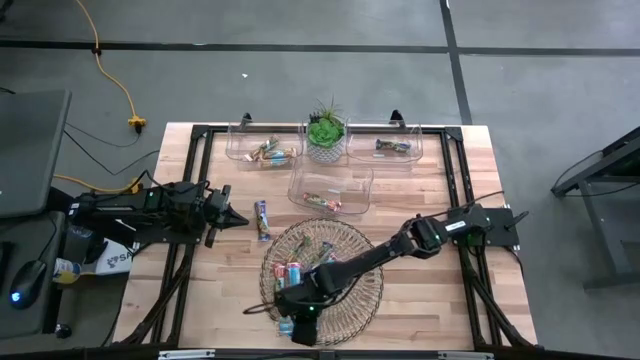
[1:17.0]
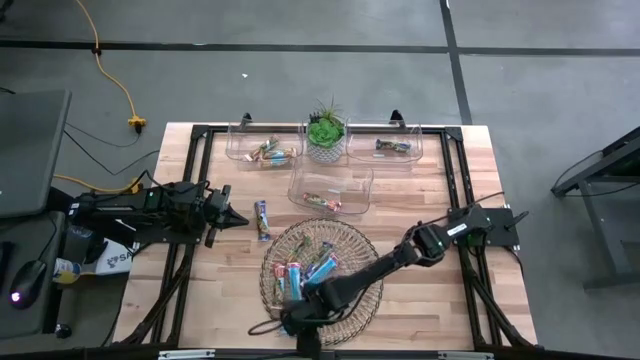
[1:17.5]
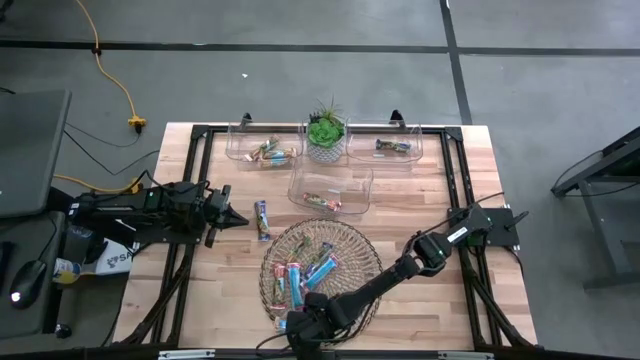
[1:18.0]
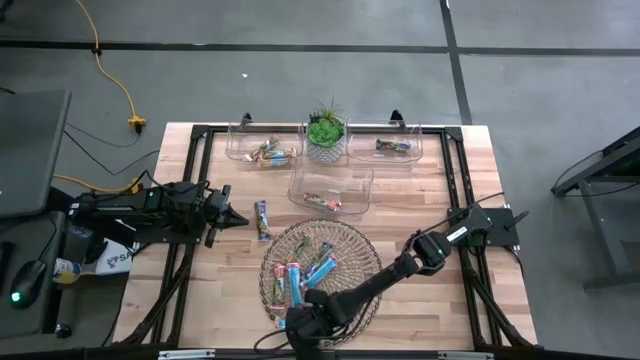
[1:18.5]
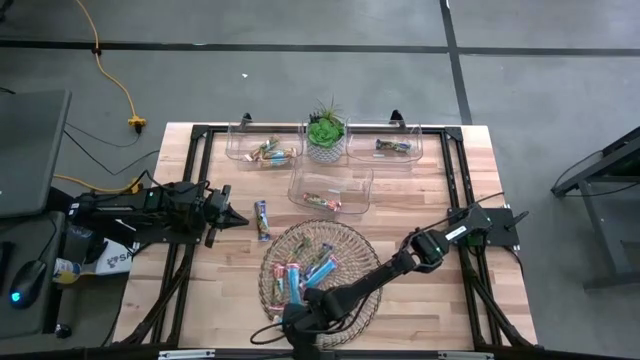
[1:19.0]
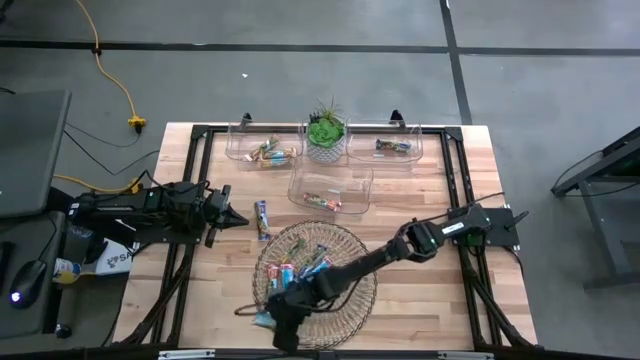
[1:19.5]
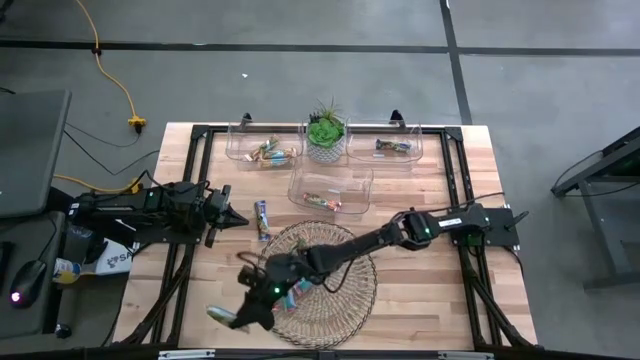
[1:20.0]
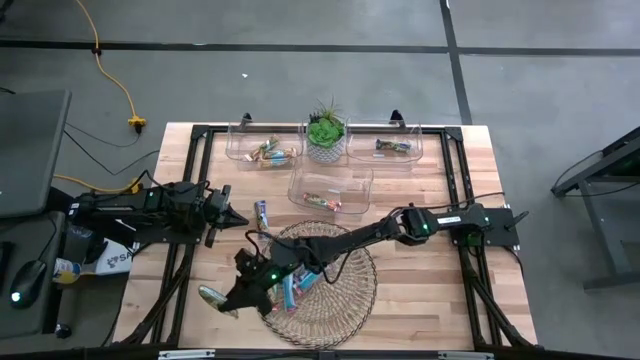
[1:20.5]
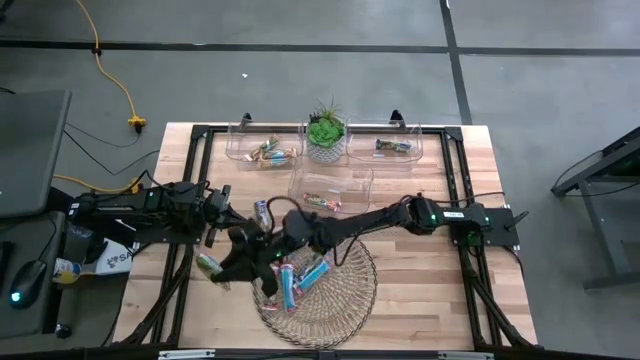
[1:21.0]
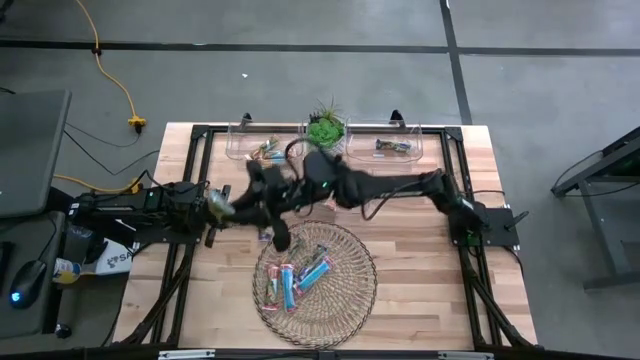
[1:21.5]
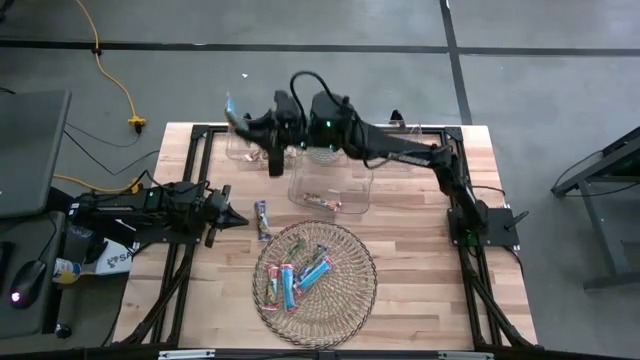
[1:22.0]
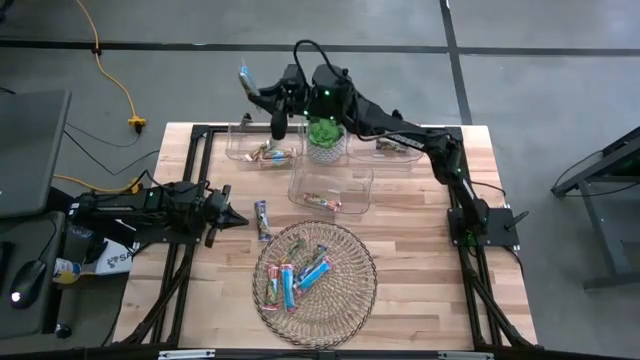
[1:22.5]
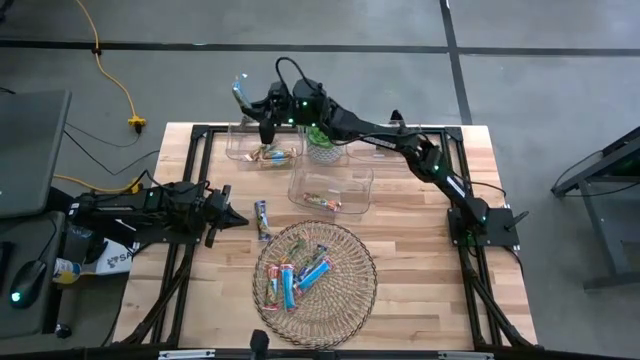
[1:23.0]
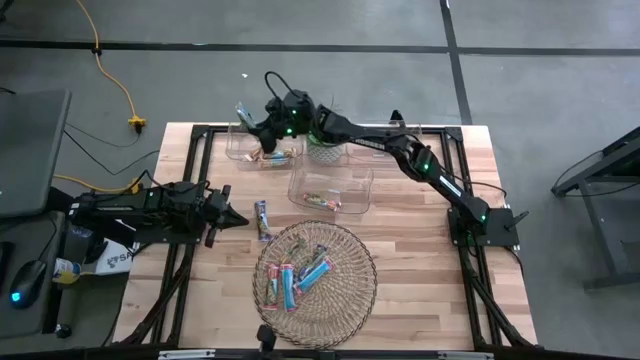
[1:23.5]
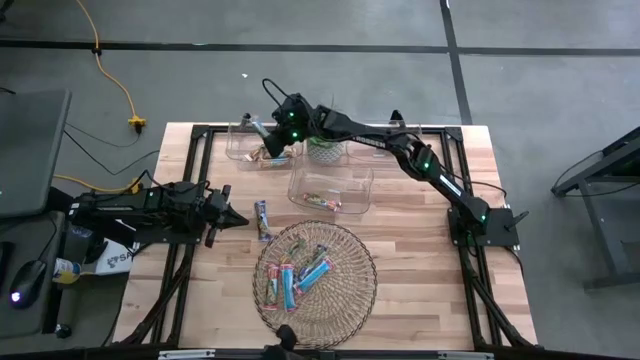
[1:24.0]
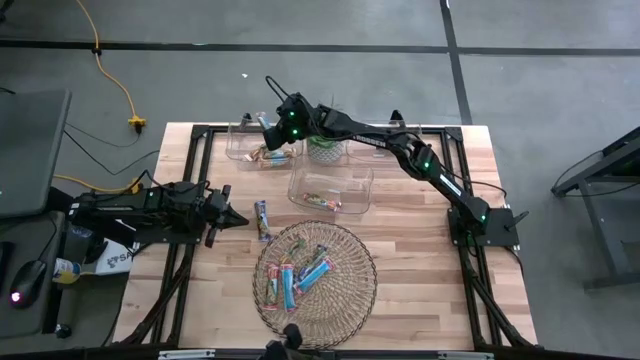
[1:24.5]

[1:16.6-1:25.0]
Task: Pick and place Granola Bars by type
Put the yellow granola bar into the top left transparent bin

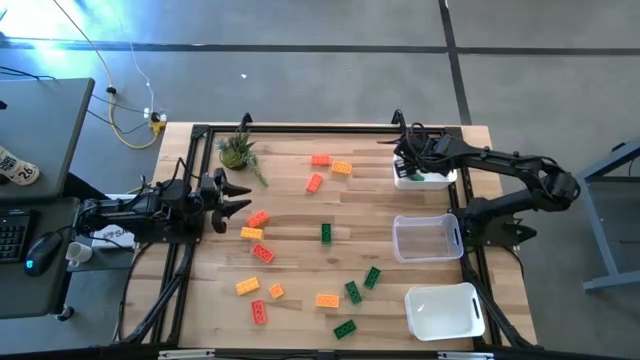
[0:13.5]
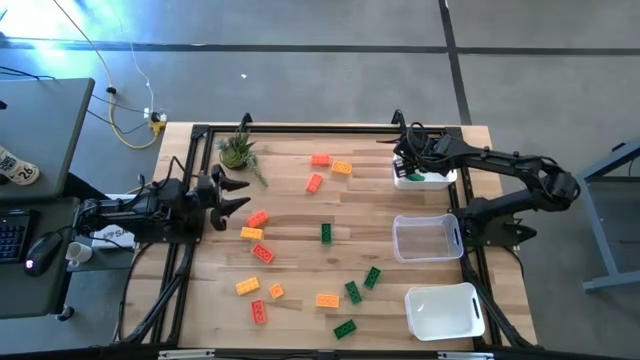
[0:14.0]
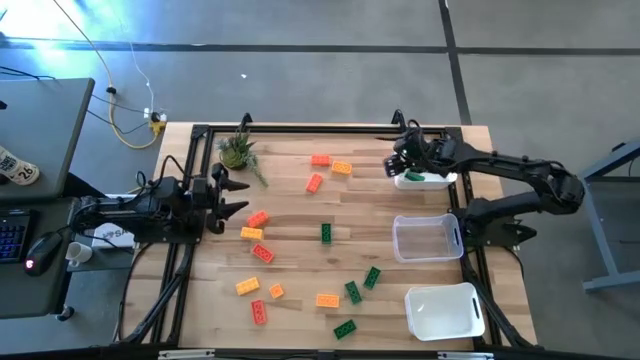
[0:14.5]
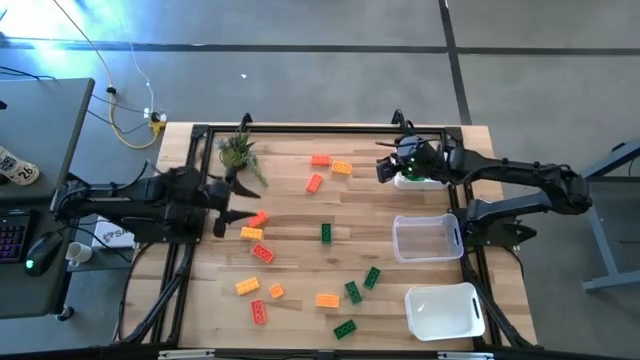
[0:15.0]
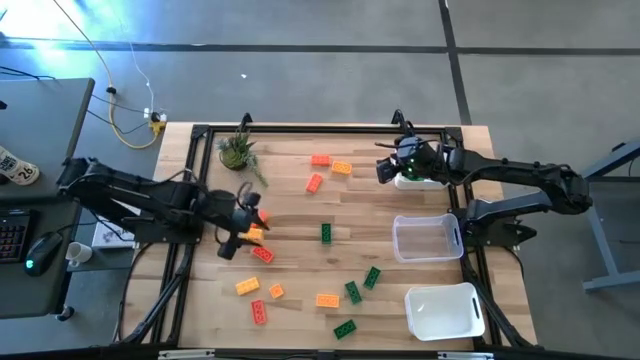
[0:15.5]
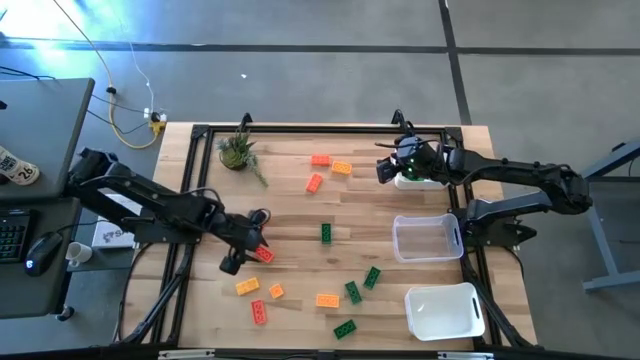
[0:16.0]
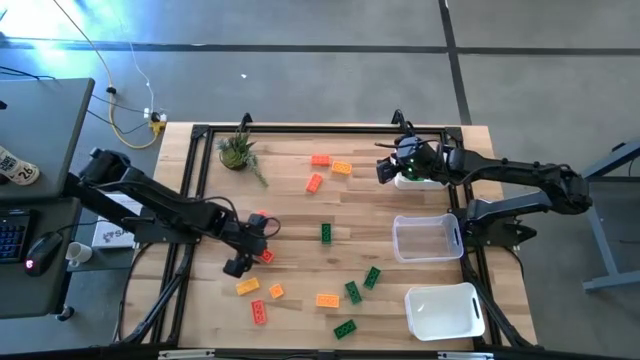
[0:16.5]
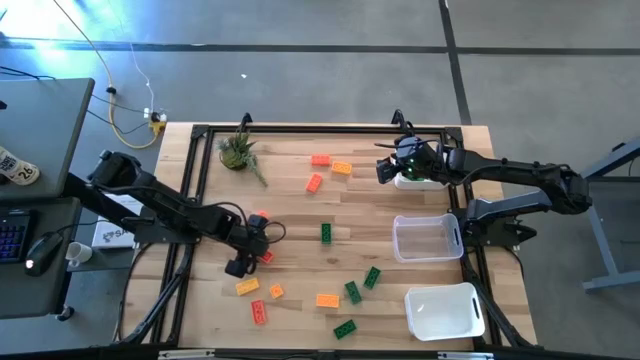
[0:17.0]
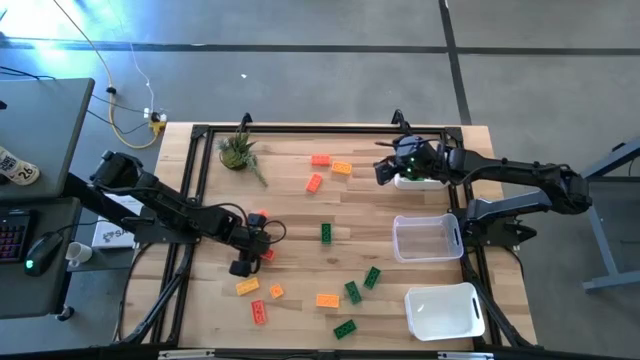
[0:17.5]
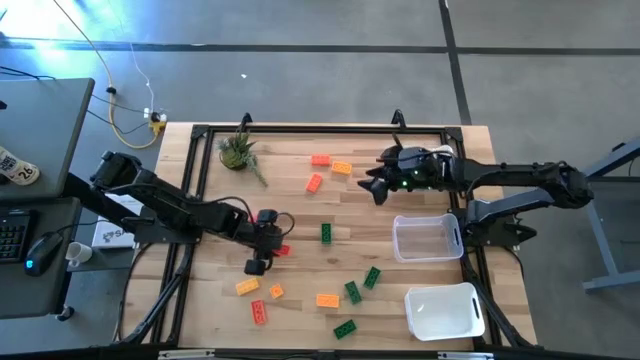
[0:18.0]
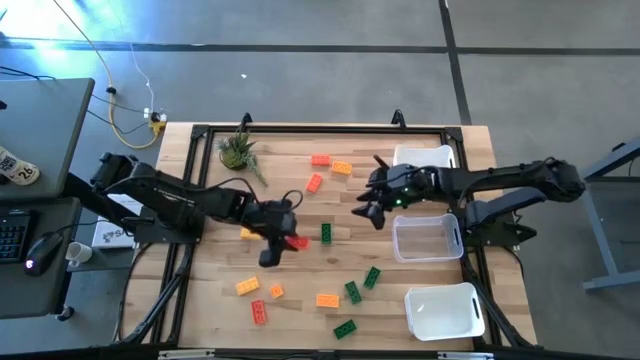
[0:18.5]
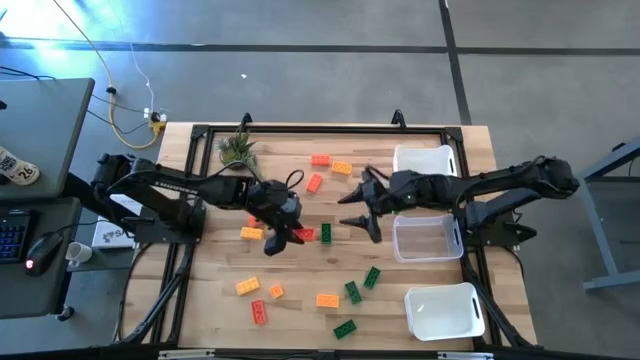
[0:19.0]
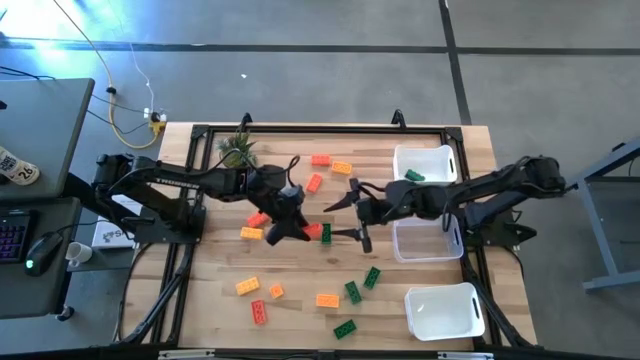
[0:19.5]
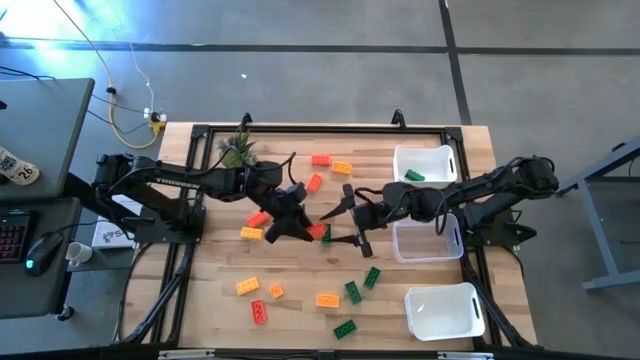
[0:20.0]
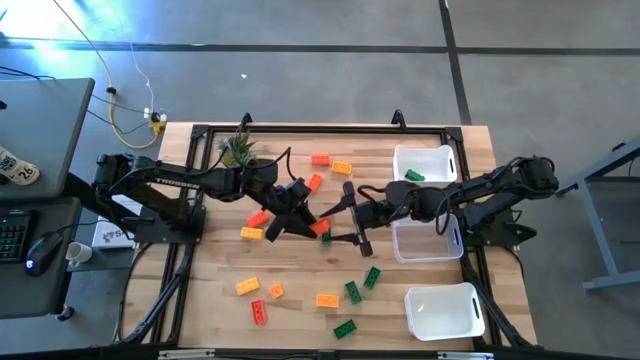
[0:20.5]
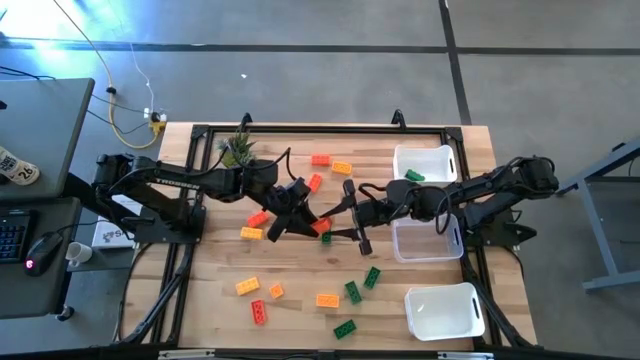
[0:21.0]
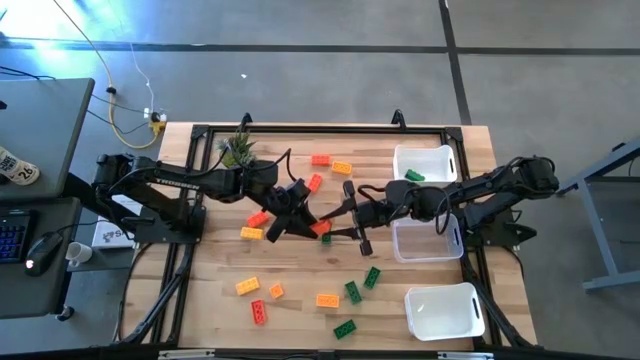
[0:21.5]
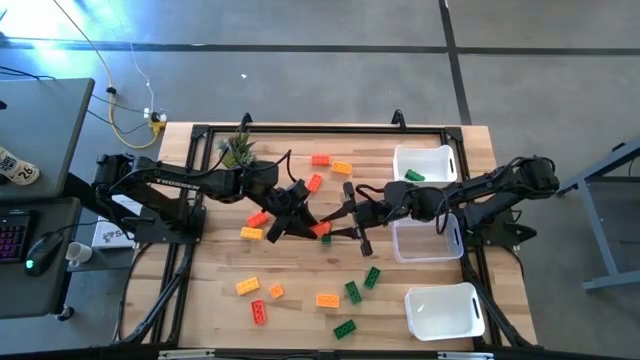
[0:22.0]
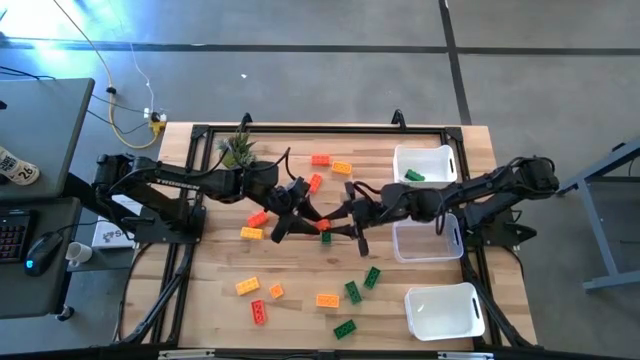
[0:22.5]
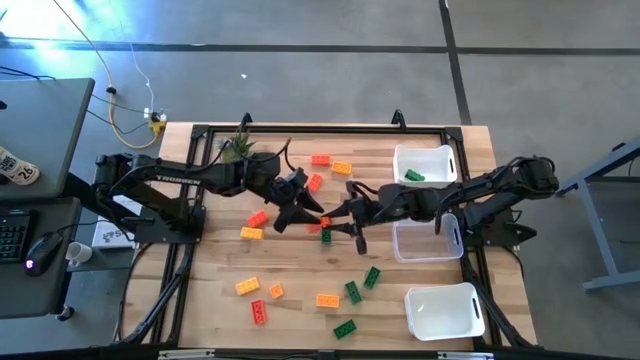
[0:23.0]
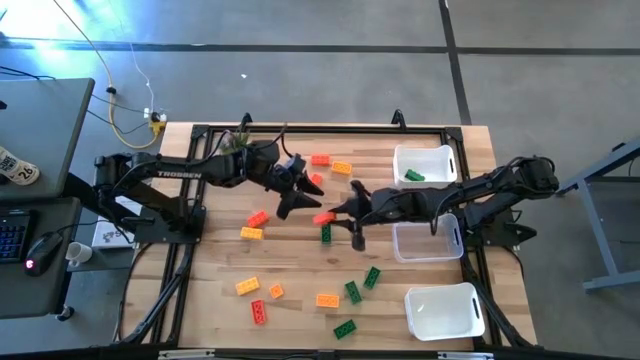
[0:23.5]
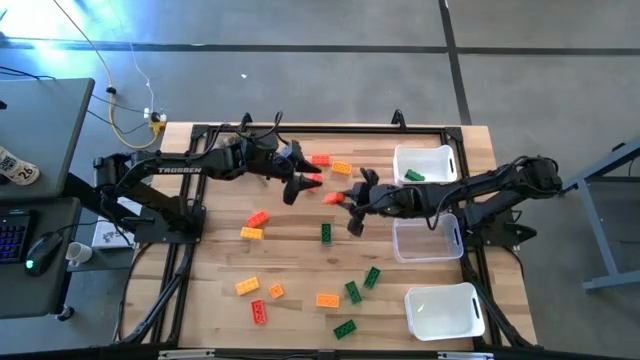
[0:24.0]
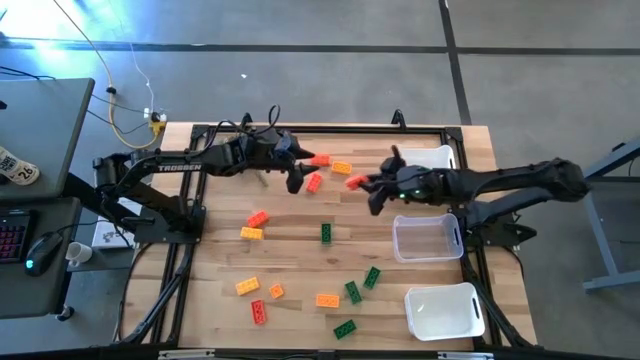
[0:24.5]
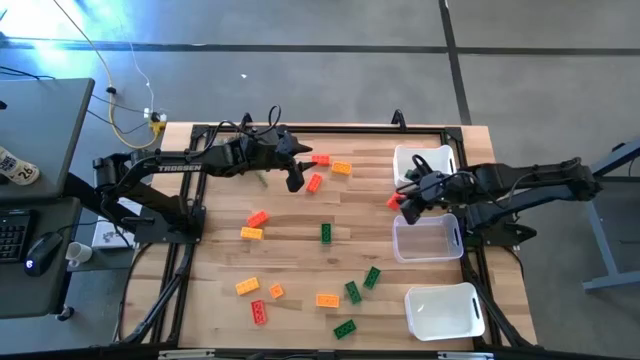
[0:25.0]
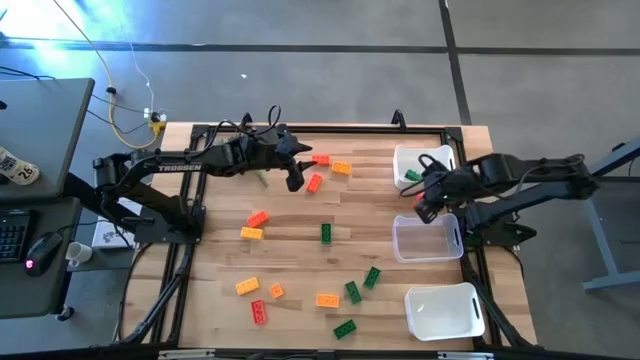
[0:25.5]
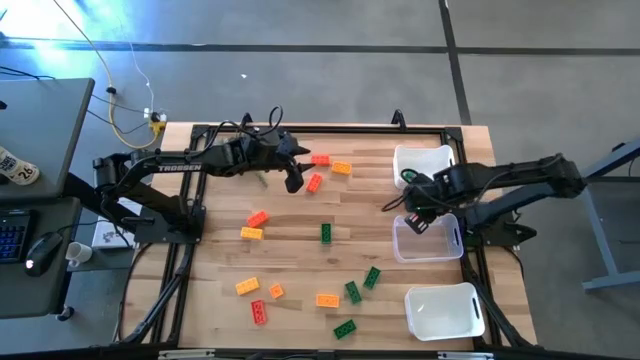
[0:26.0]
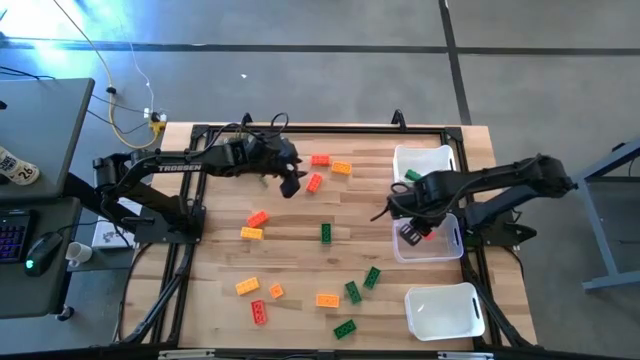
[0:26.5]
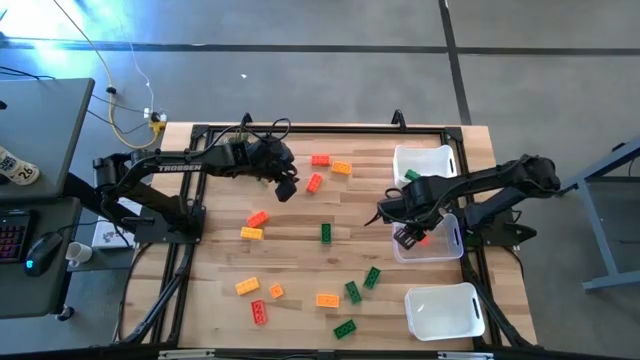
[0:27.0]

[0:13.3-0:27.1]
Task: Sort & place blocks by color
Put the orange game piece into the transparent bin
